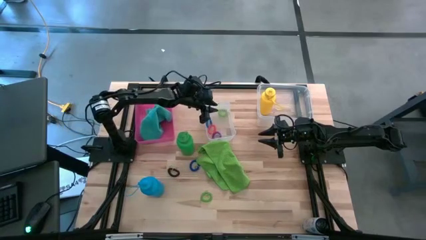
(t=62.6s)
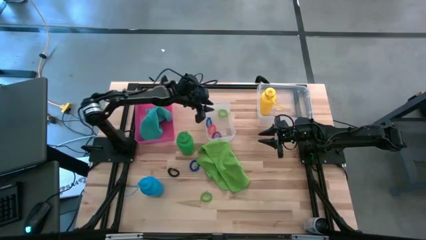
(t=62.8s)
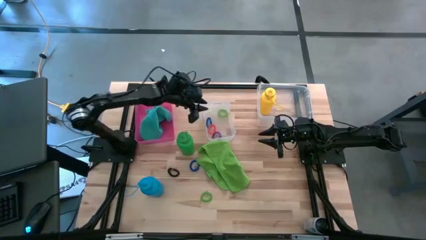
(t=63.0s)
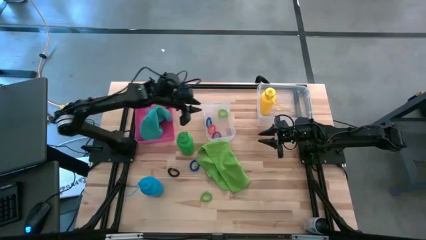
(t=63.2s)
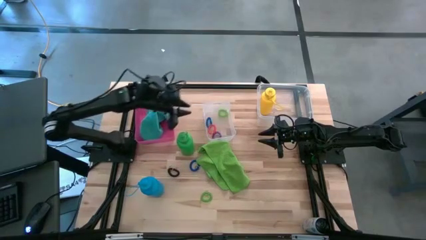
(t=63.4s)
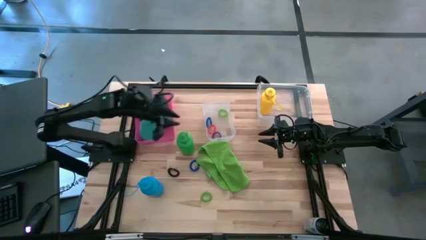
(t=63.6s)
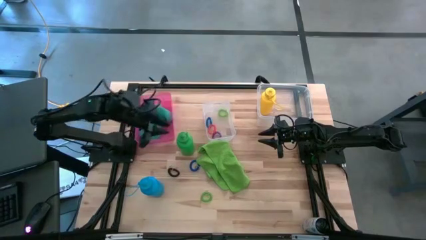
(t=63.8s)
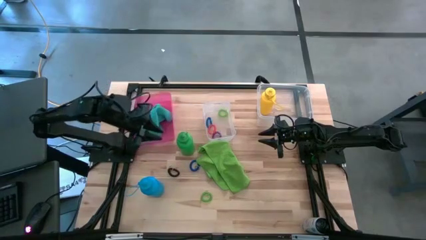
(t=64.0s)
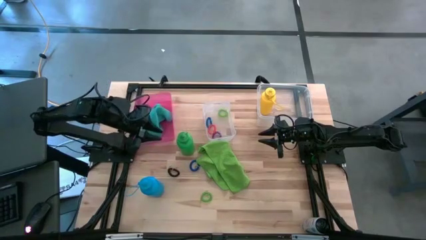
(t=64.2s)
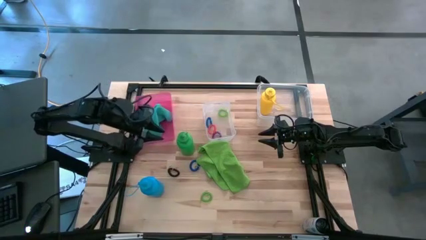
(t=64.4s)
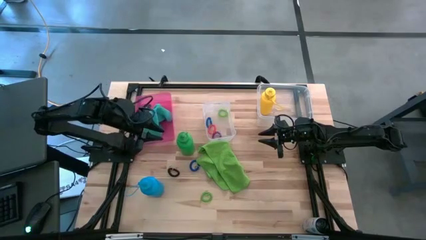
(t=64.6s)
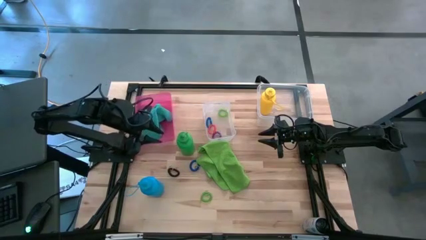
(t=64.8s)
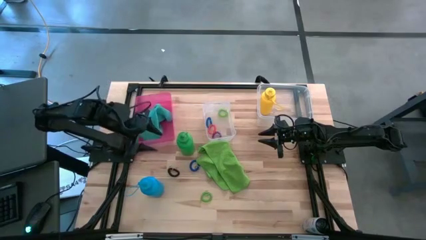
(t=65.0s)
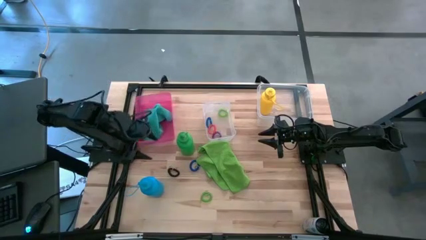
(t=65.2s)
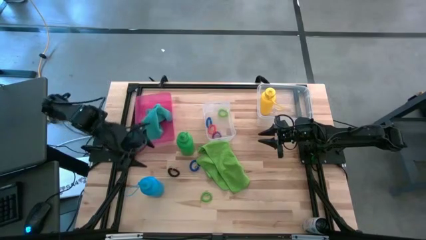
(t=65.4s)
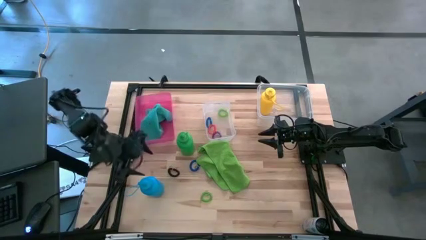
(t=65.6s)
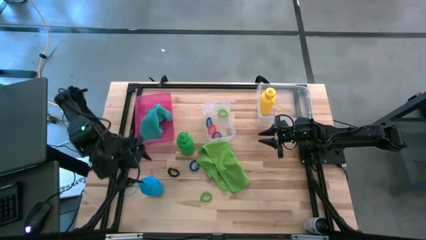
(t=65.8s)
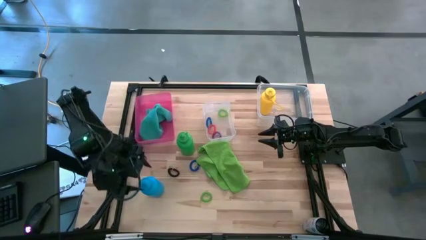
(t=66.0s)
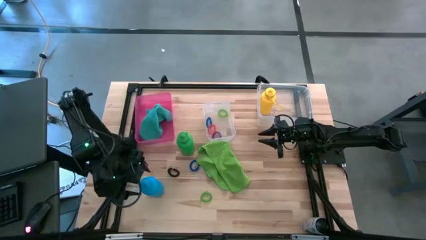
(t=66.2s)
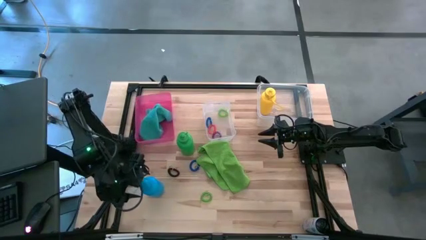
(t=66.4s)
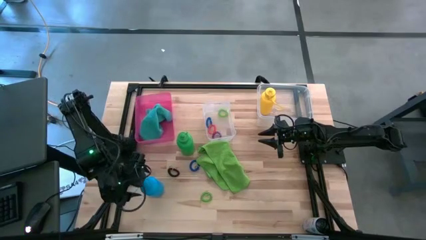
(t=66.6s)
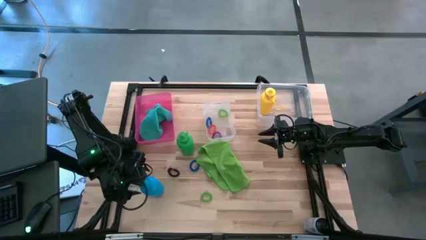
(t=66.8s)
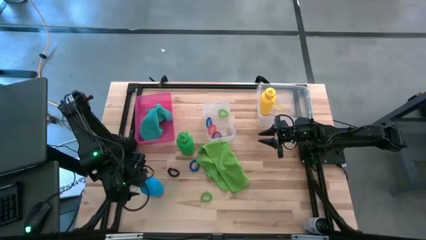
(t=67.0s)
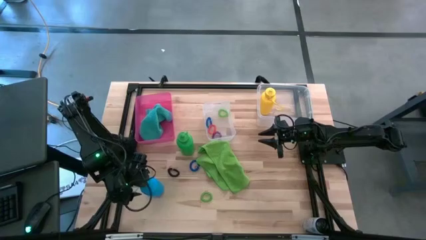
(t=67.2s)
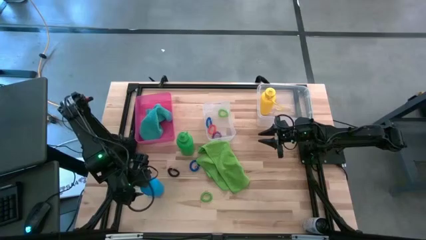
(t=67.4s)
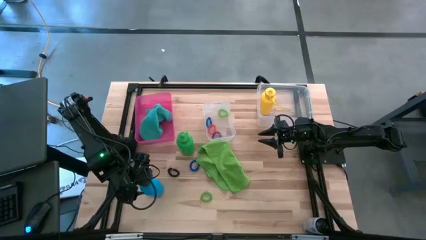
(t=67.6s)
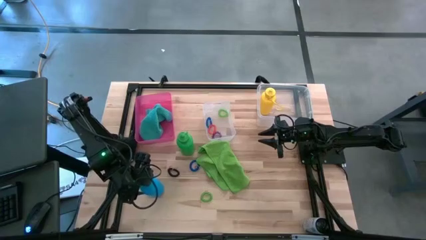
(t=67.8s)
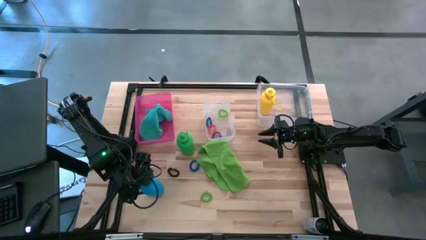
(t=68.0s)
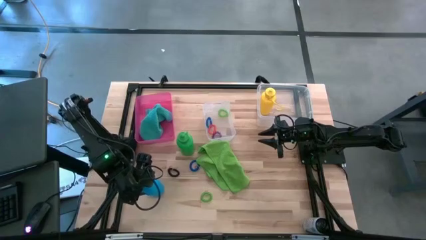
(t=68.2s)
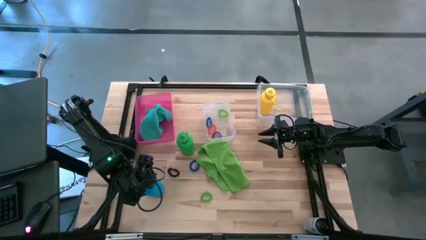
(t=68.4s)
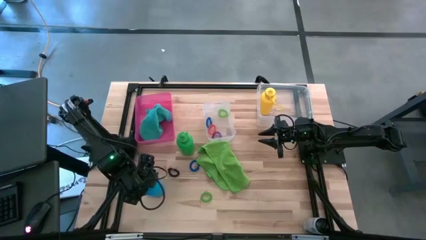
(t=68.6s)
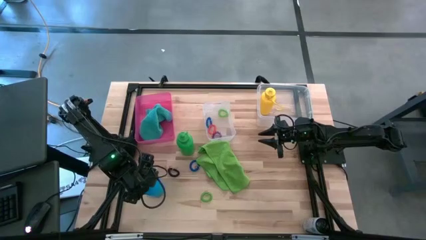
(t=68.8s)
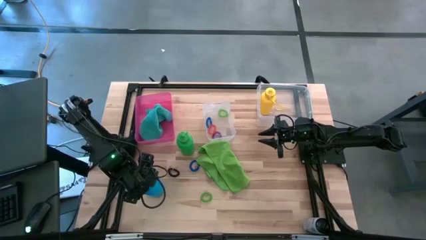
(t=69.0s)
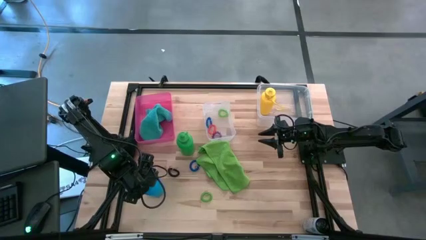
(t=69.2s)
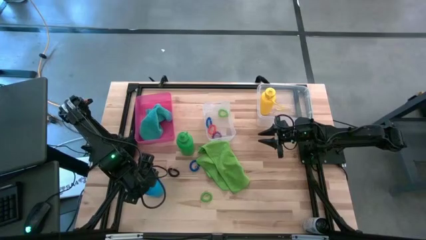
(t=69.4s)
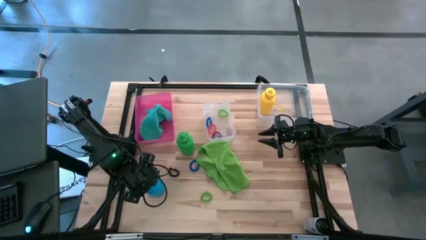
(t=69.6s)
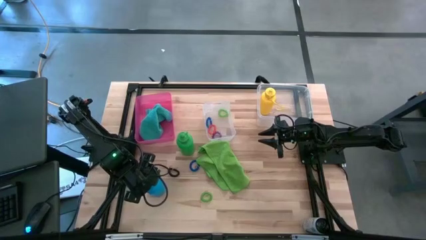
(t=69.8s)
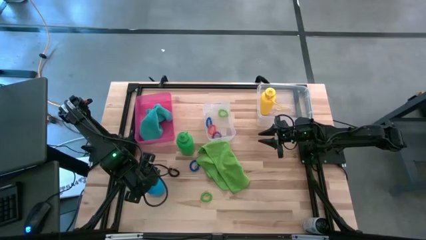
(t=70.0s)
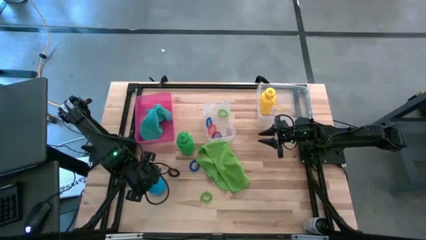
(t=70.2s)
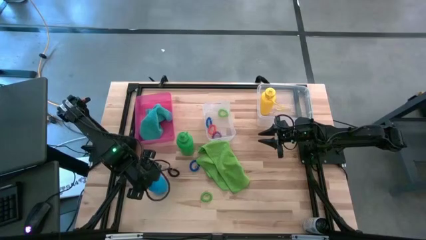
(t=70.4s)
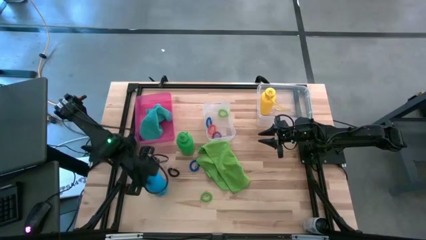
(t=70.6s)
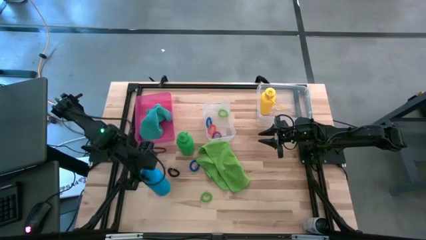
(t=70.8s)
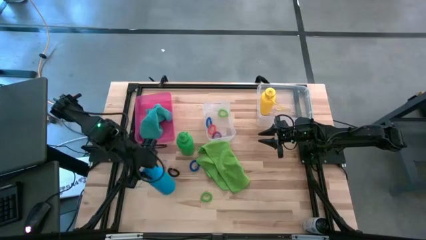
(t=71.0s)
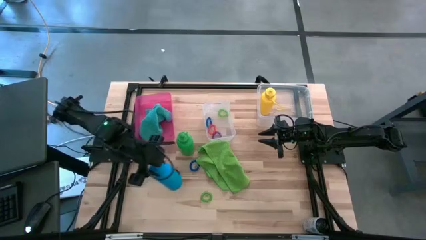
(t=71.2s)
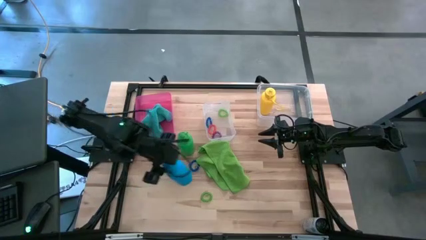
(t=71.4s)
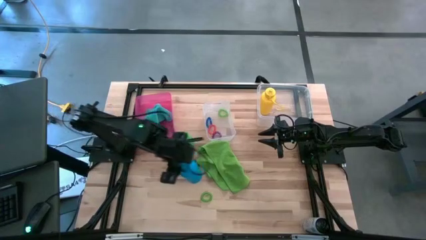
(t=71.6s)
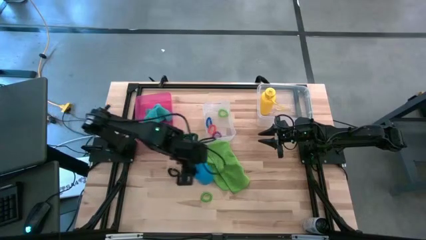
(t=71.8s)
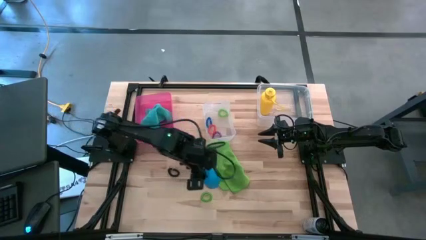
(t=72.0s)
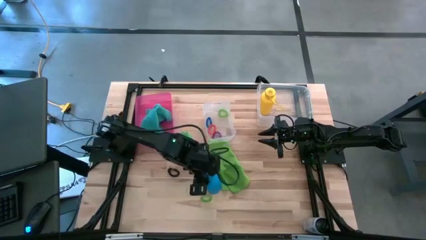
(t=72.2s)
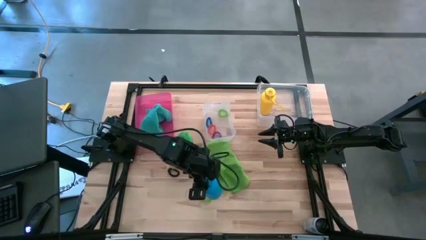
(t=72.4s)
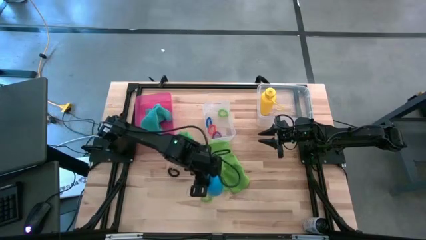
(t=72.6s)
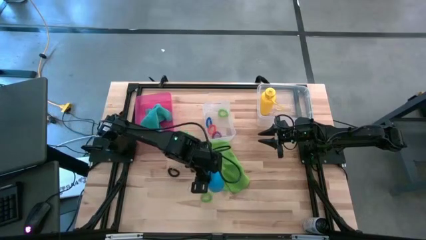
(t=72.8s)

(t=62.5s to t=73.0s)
Task: Pick & Place Sports Items
Put the blue water bottle into the right transparent bin

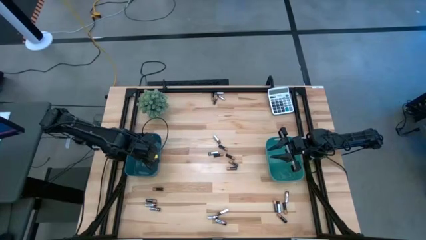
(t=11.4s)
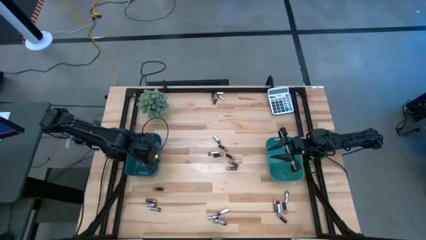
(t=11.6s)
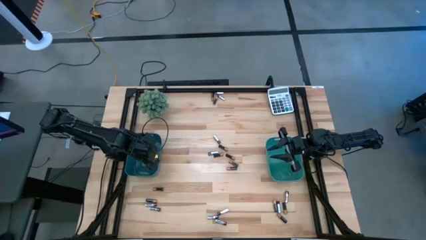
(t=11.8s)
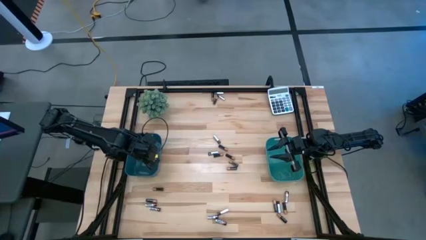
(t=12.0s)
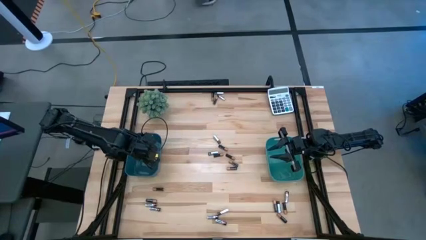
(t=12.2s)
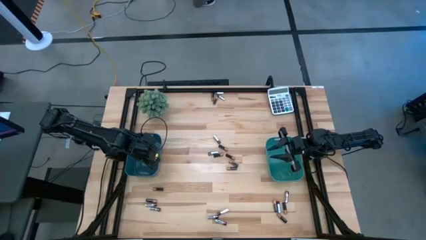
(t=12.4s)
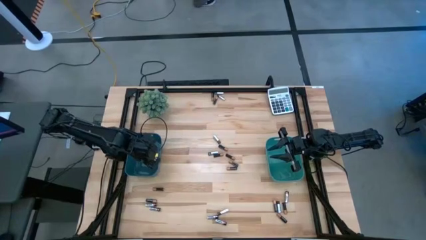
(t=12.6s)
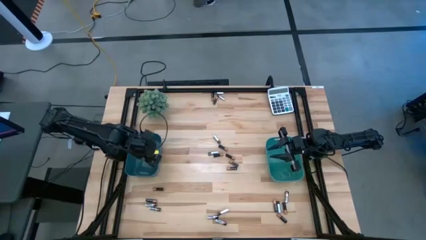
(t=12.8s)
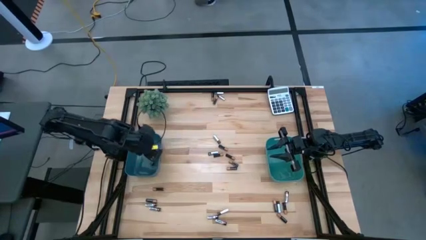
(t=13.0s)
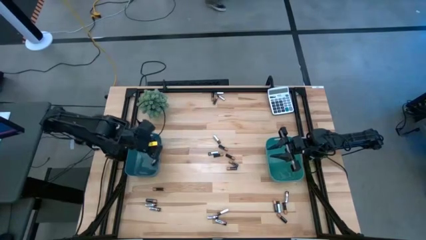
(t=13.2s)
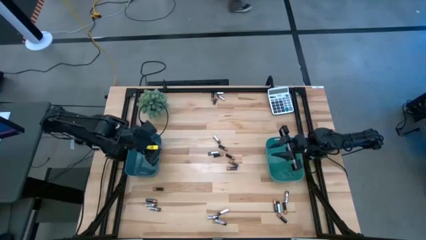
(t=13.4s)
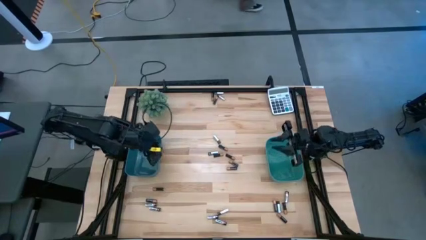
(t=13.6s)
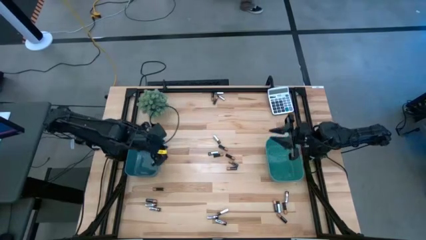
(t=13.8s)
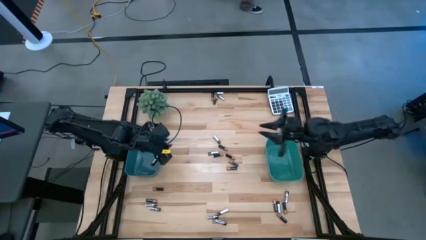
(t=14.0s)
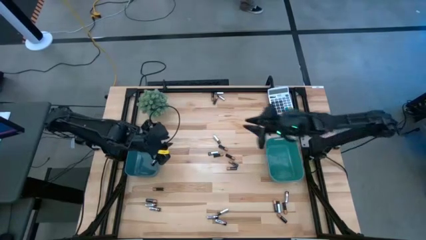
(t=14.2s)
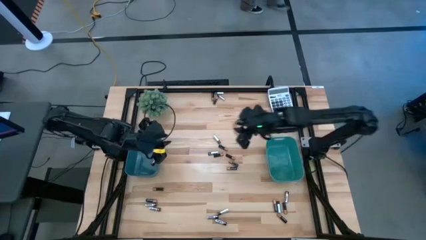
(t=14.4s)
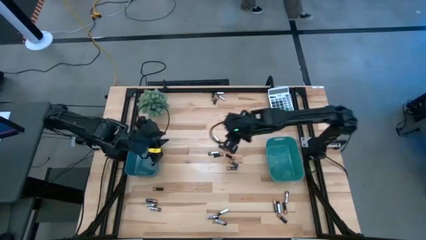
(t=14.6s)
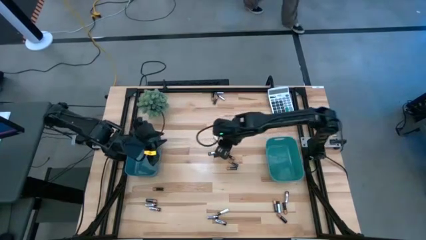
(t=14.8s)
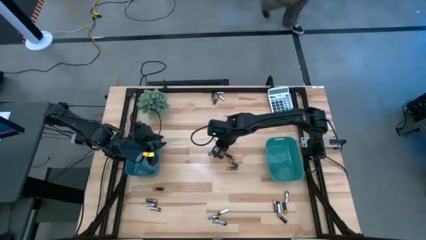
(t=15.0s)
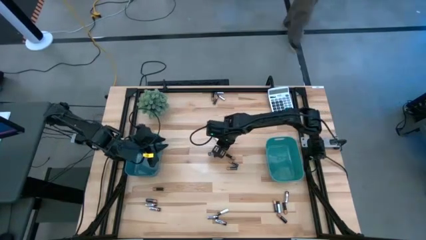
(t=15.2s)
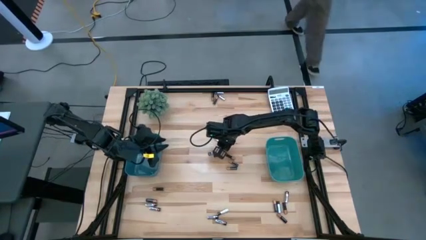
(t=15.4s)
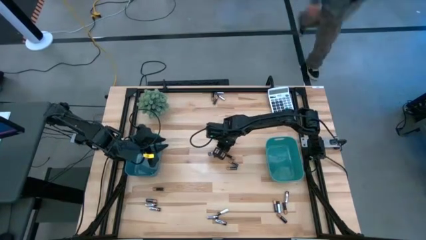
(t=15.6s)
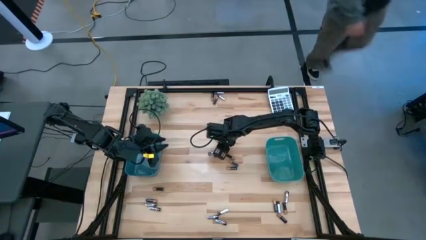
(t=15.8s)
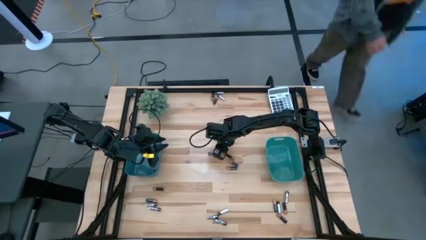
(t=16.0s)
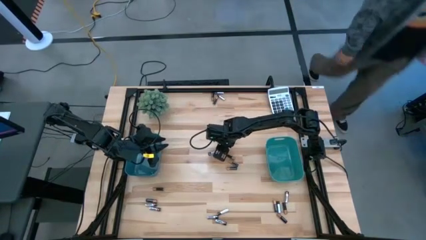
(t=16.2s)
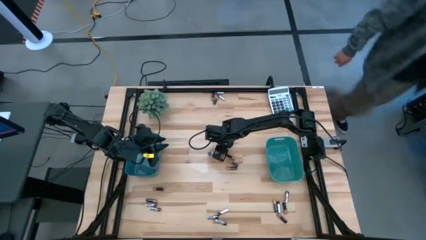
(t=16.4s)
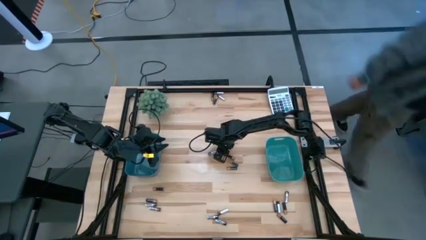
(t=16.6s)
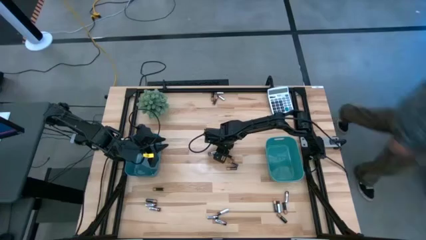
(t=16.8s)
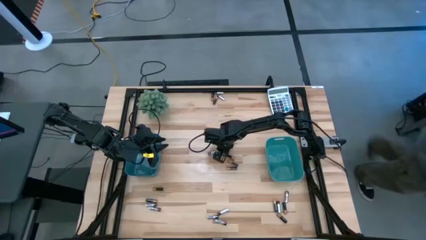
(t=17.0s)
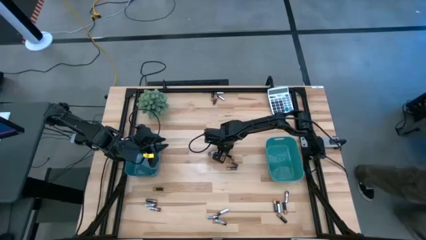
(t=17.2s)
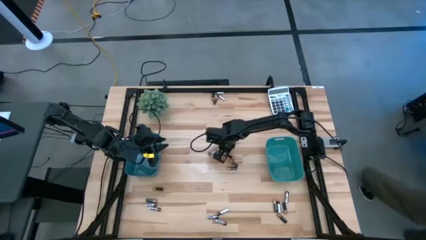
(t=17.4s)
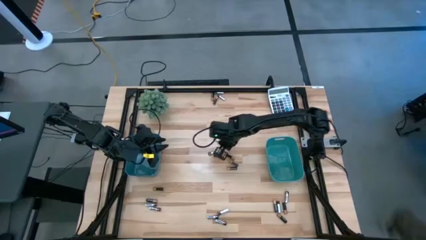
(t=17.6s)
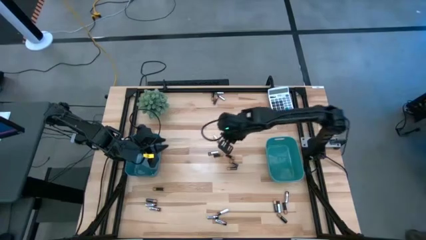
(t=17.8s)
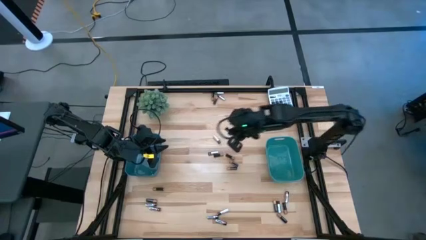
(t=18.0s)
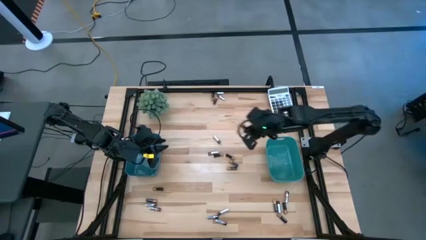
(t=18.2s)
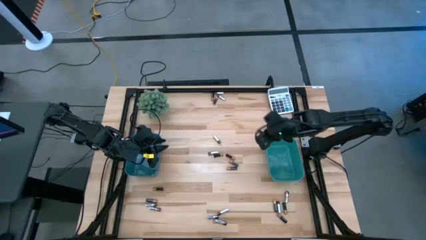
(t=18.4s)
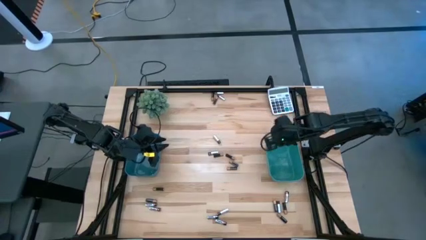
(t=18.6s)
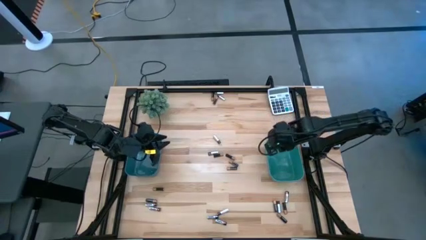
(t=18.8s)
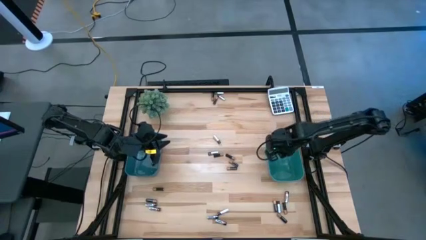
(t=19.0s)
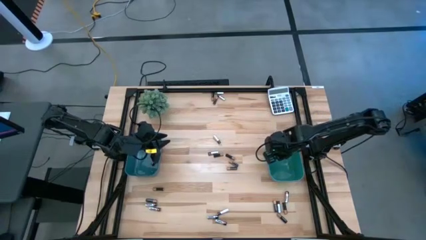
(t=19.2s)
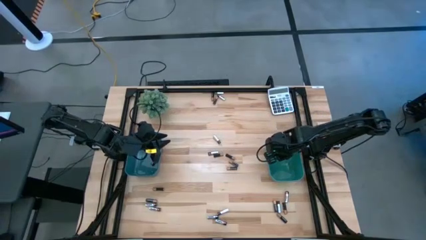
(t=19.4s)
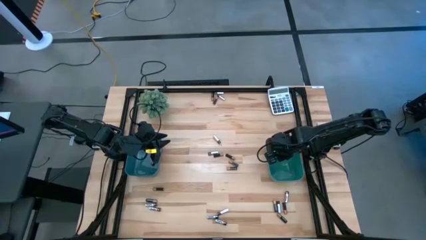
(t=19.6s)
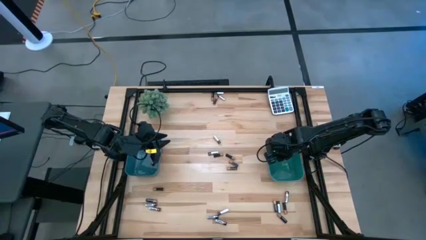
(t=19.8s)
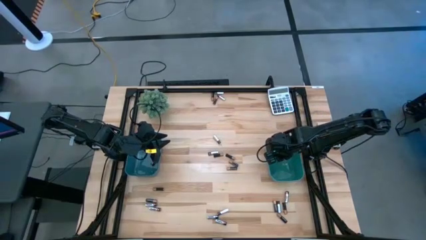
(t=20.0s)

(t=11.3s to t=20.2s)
Task: Sort batteries
Put the black battery into the green bin
